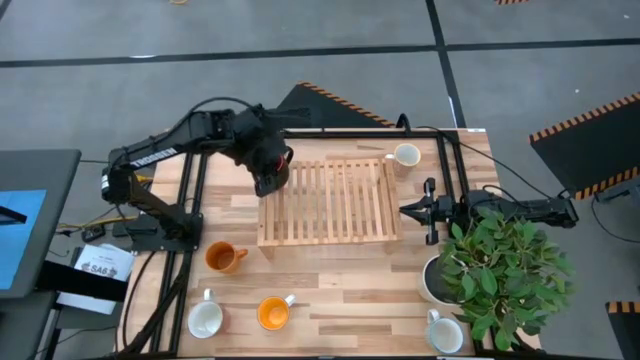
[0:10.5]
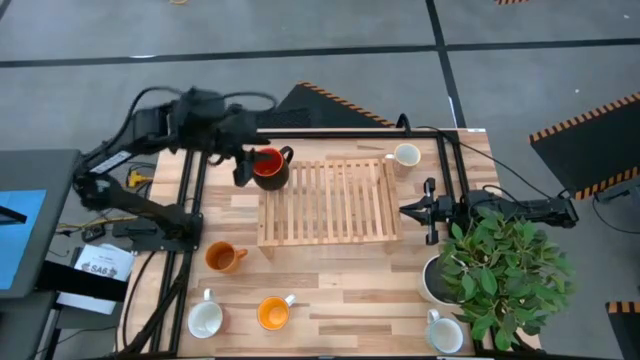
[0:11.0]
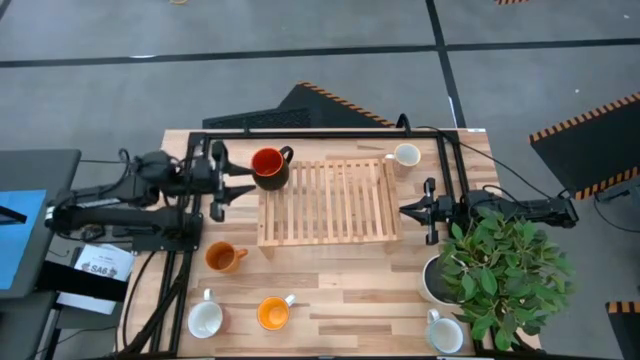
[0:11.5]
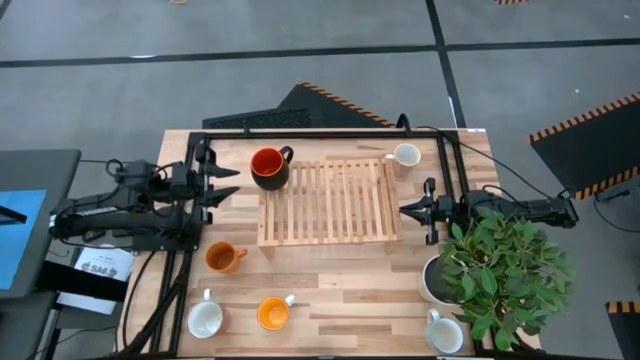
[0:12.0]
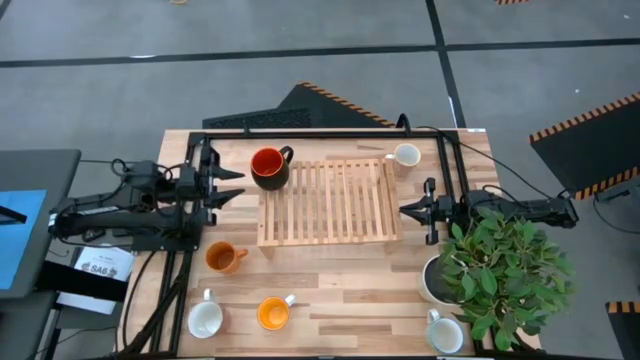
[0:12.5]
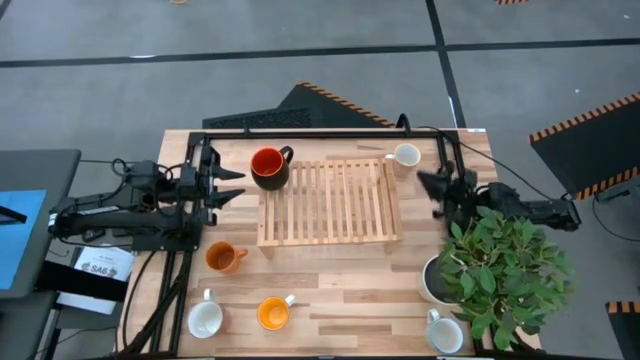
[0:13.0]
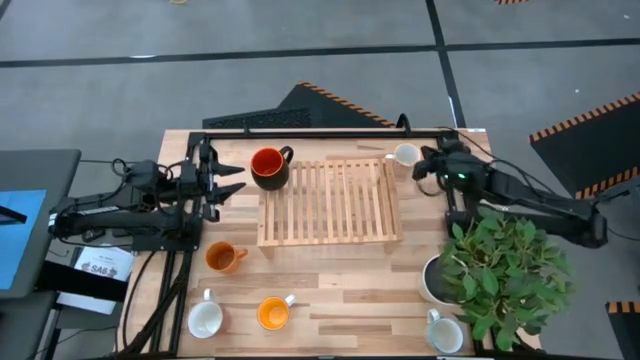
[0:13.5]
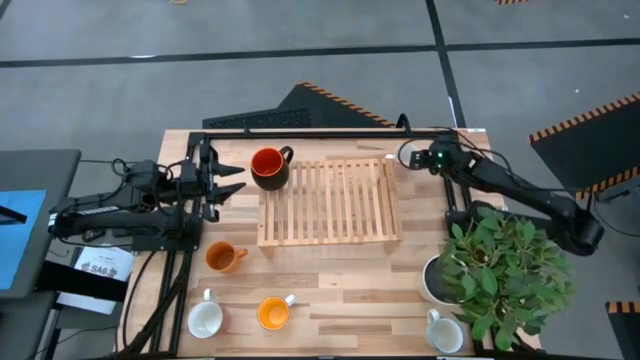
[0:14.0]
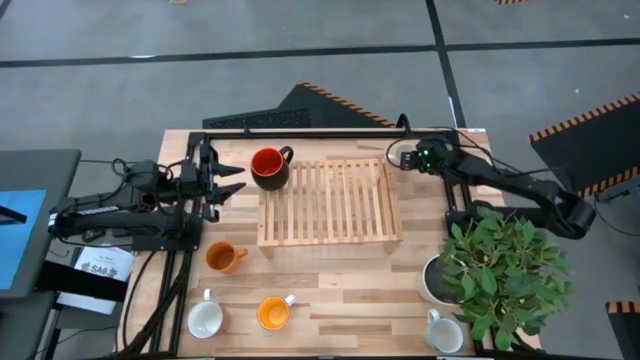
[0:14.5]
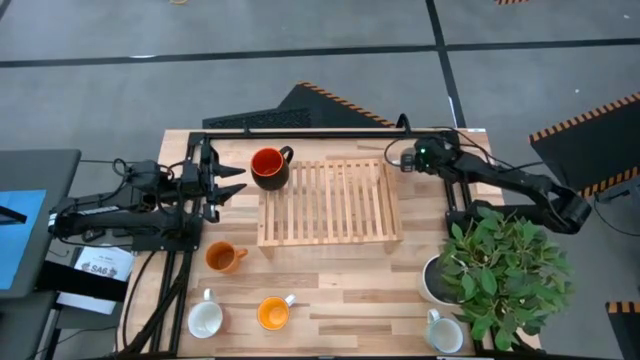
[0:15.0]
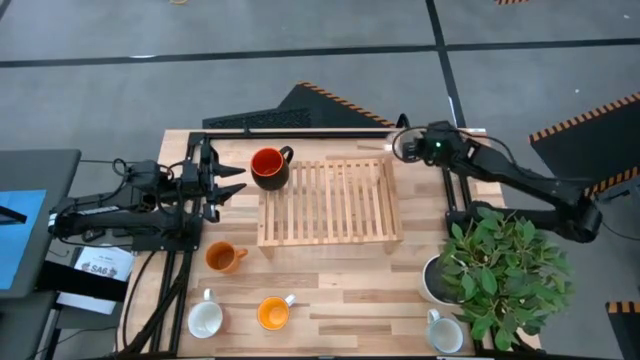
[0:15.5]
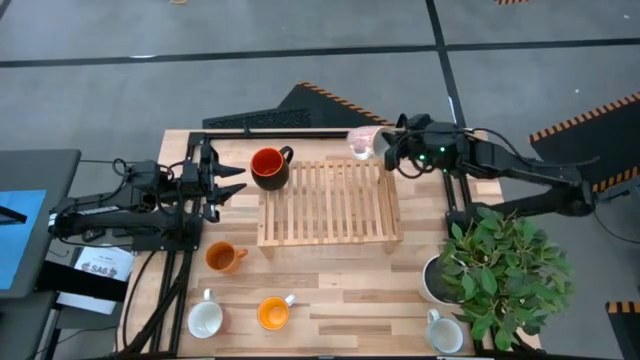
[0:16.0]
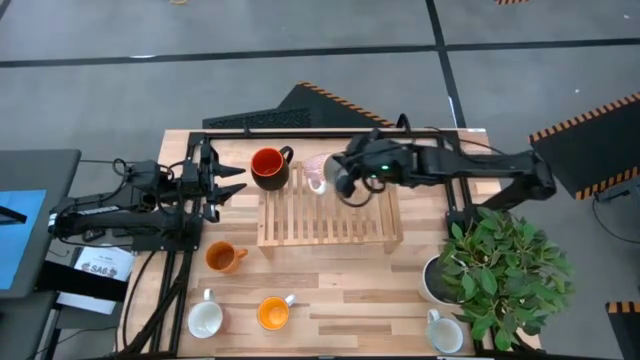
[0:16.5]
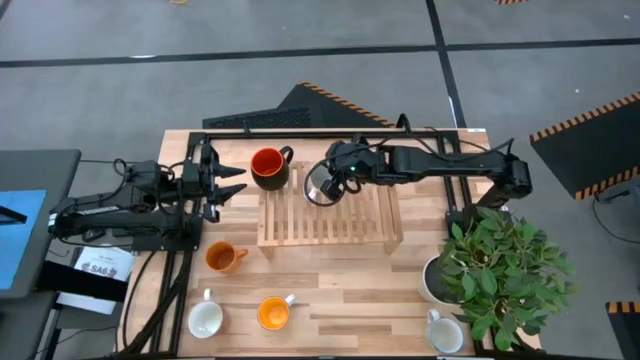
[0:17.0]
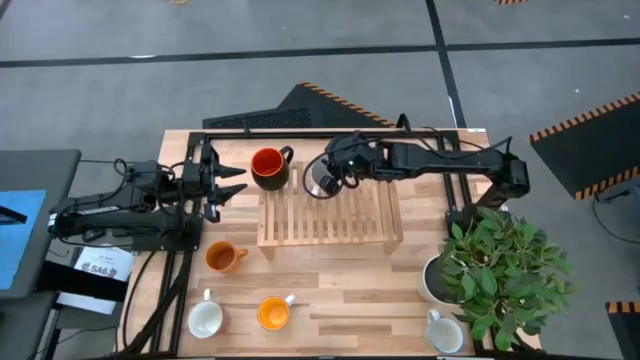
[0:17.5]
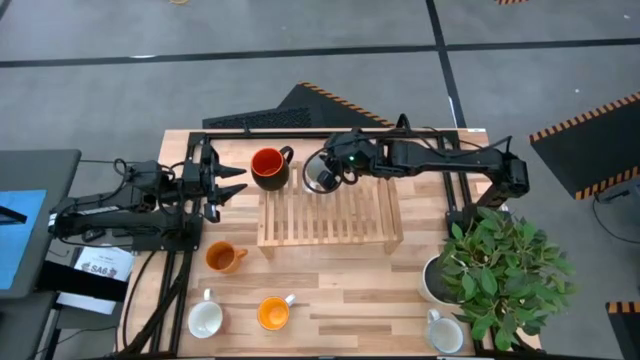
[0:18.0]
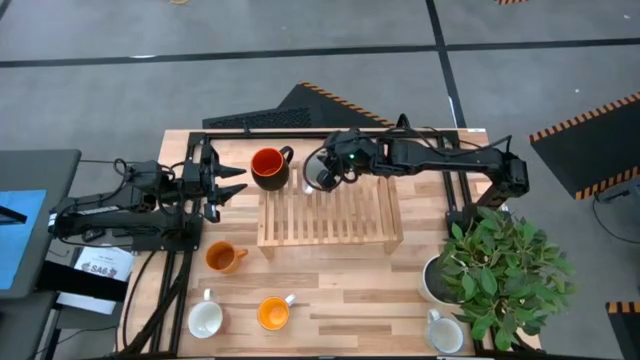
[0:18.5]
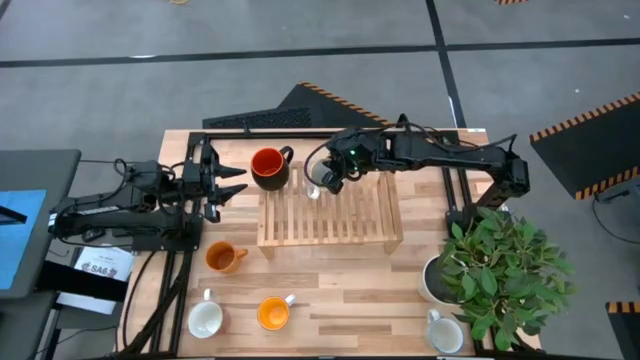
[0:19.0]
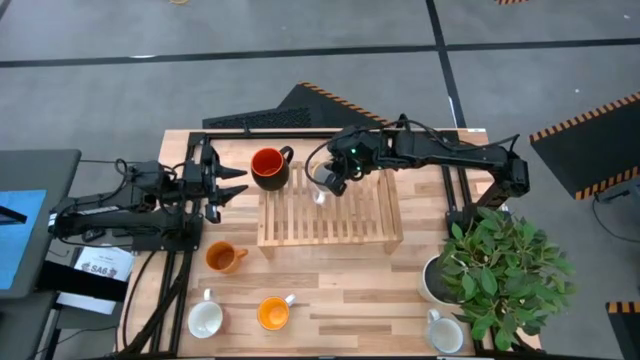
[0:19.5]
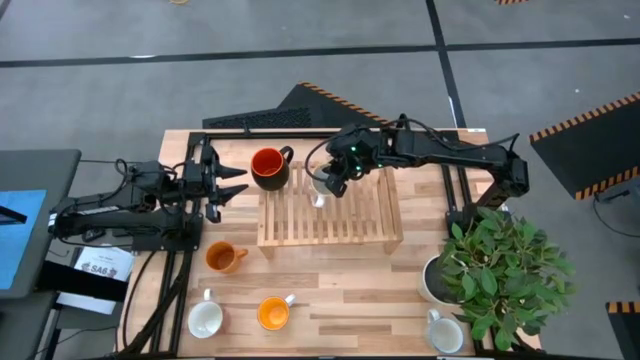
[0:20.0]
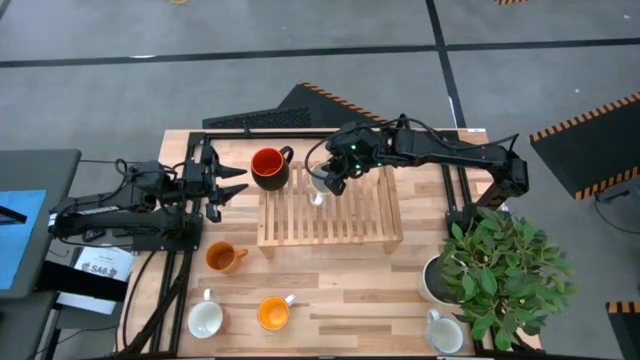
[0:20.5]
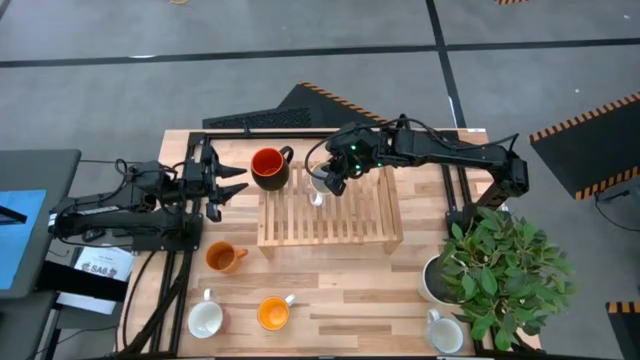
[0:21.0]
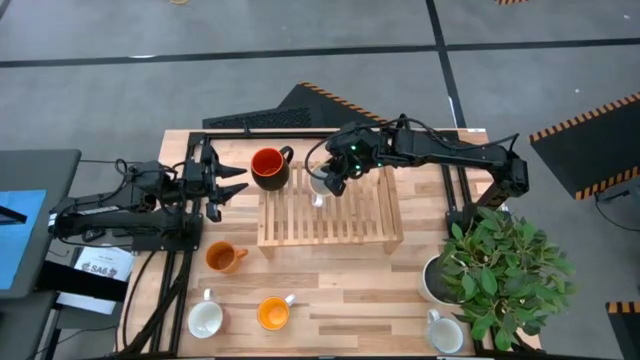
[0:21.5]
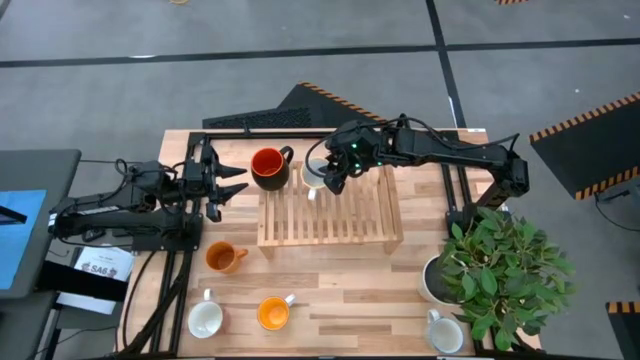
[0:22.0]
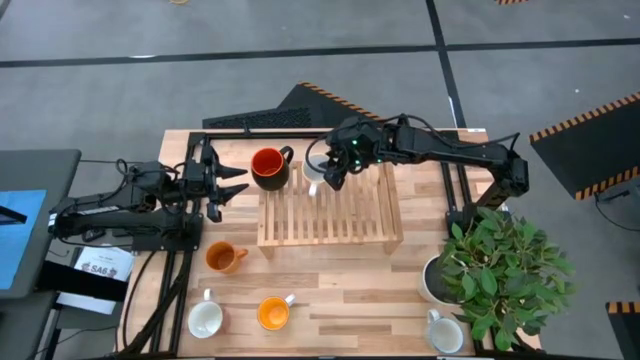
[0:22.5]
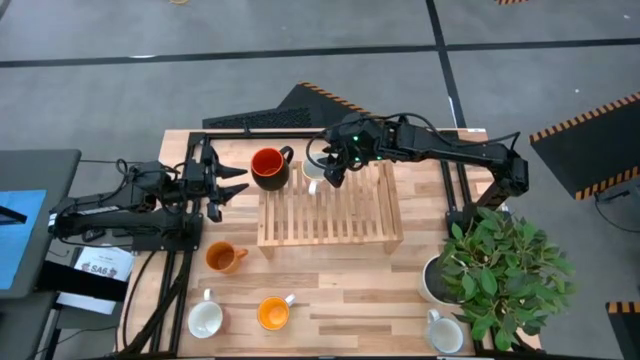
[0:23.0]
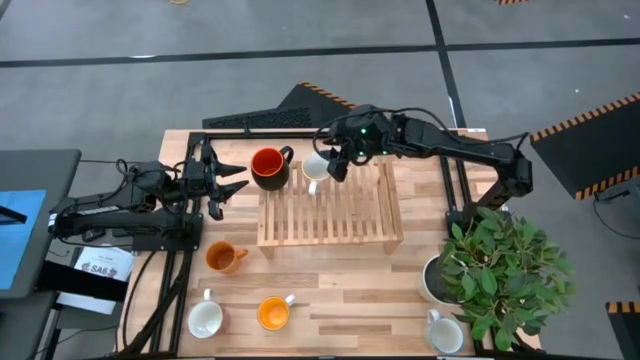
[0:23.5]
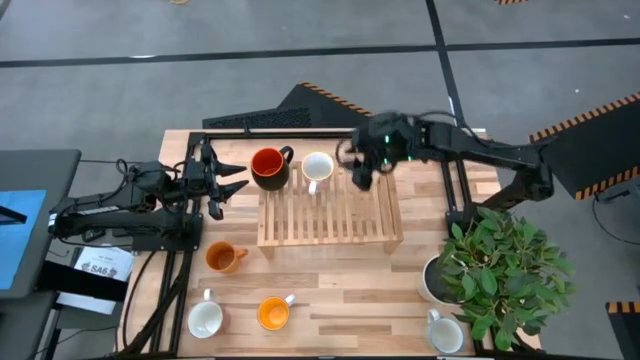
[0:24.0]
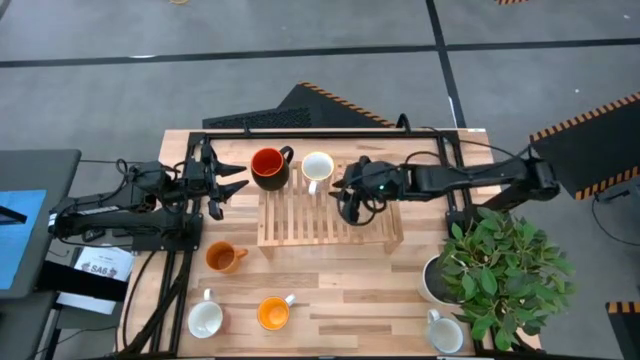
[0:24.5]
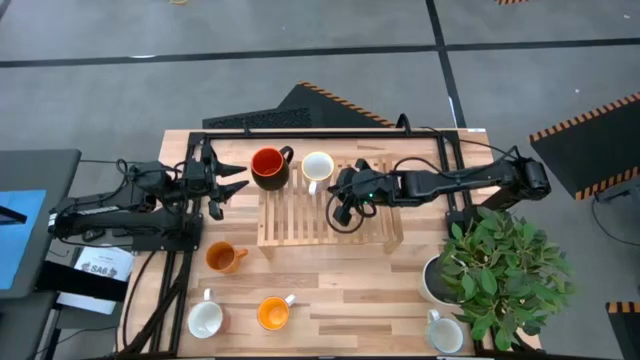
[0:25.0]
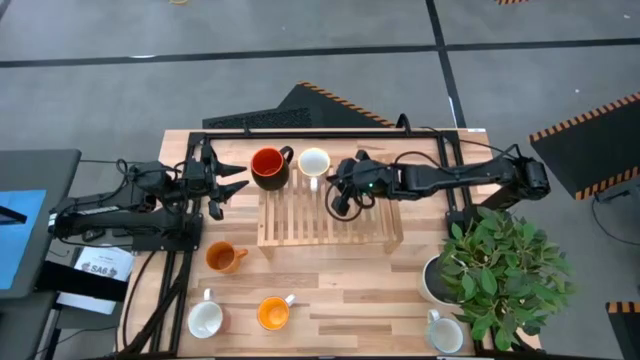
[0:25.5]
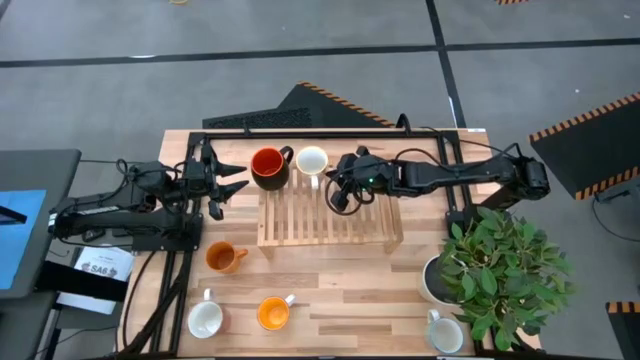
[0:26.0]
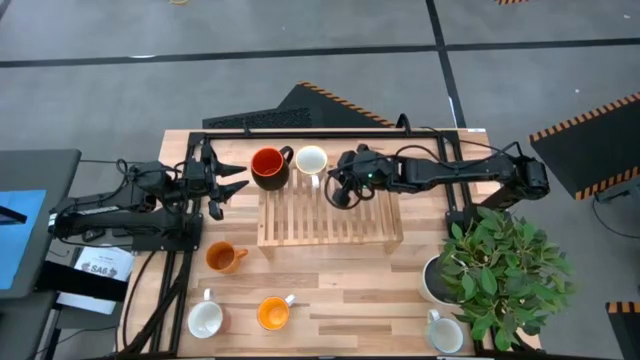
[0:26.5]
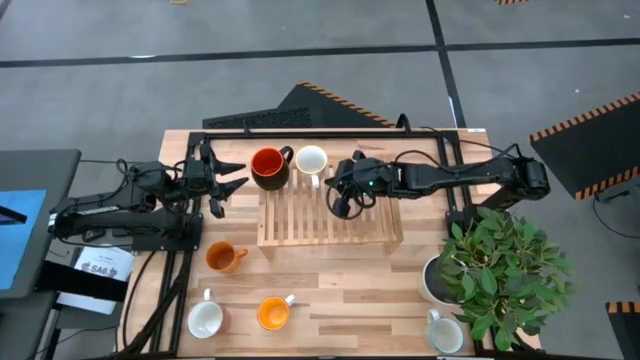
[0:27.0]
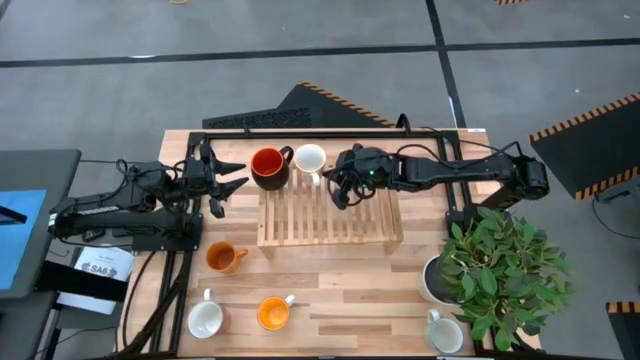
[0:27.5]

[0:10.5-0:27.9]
Task: Place coffee mugs
Put the orange patterned mug on the shelf
